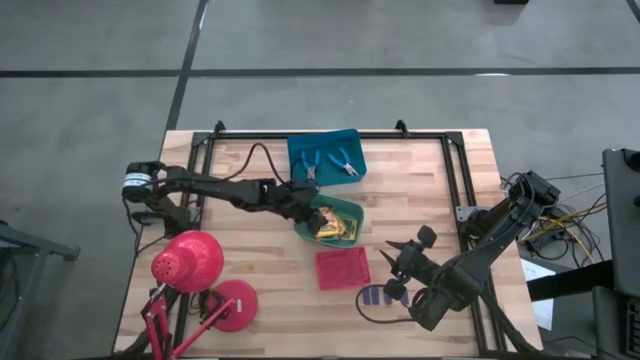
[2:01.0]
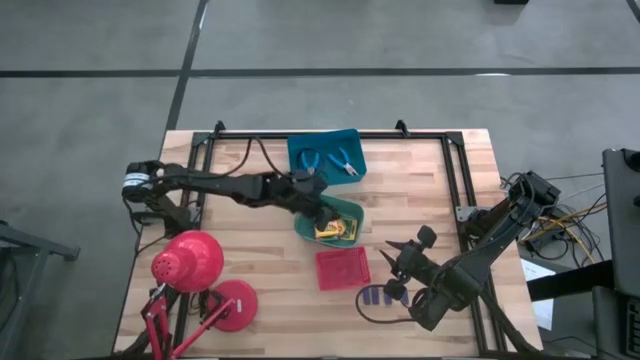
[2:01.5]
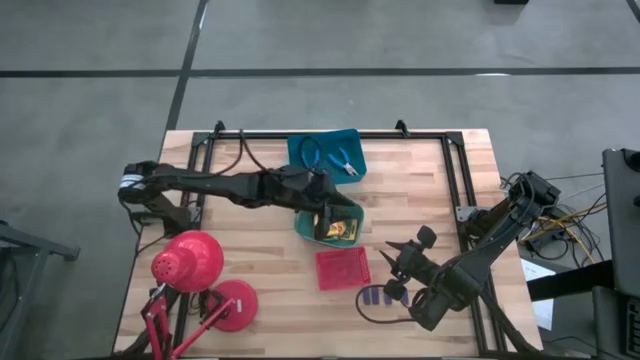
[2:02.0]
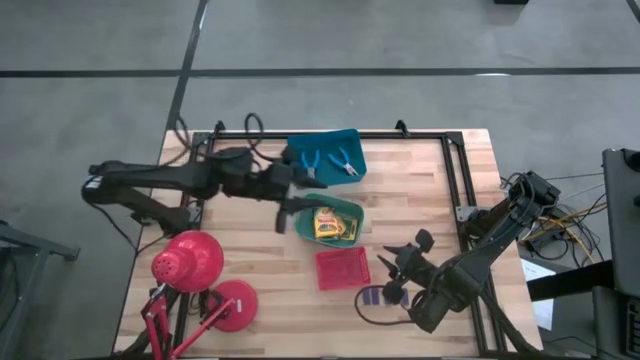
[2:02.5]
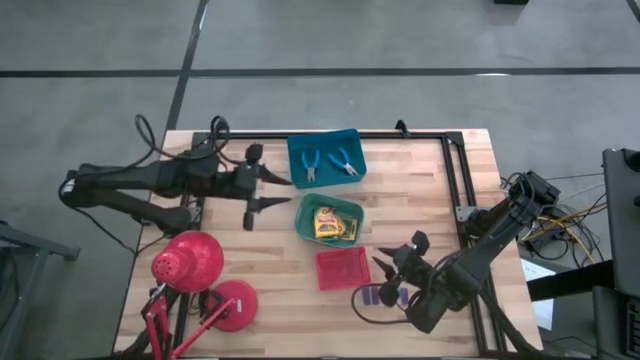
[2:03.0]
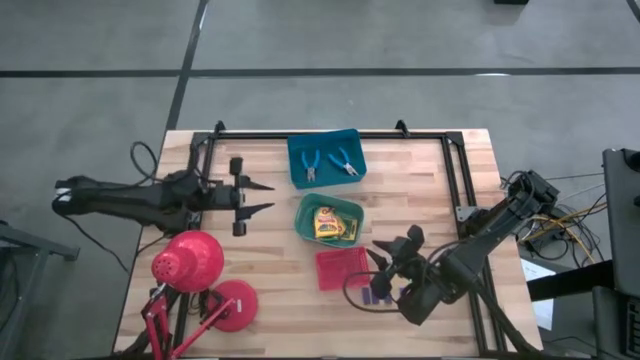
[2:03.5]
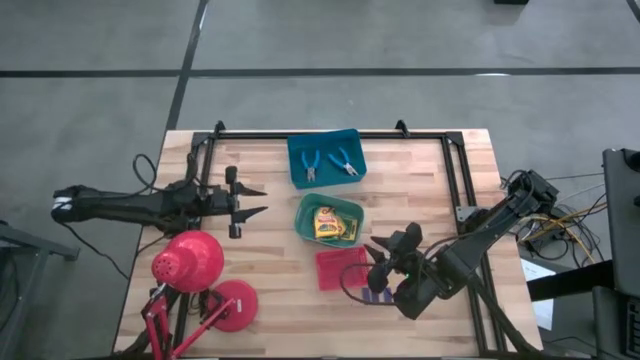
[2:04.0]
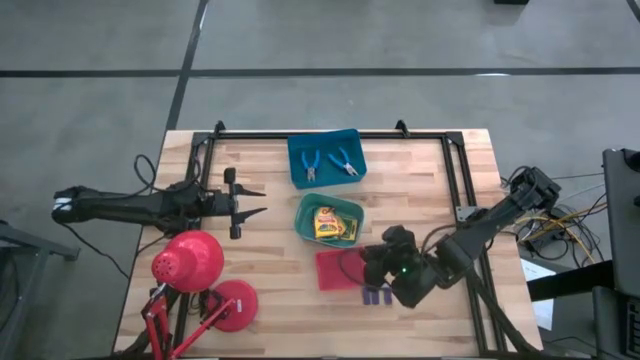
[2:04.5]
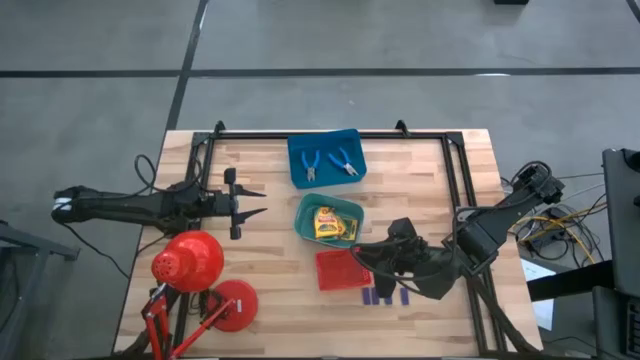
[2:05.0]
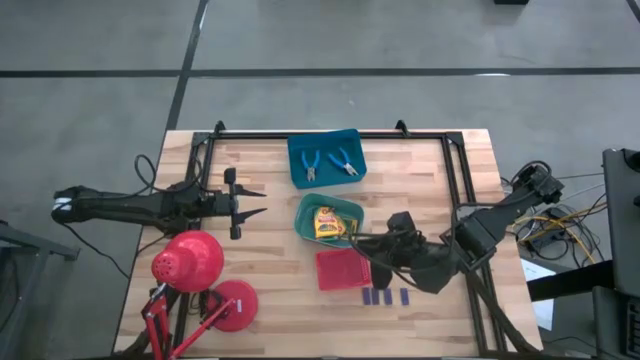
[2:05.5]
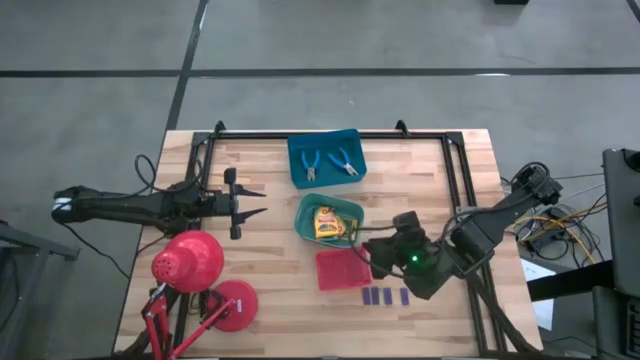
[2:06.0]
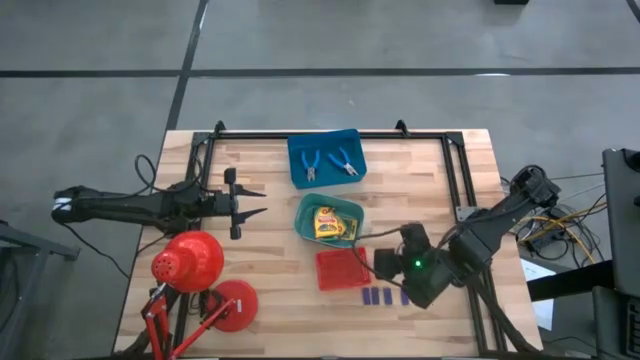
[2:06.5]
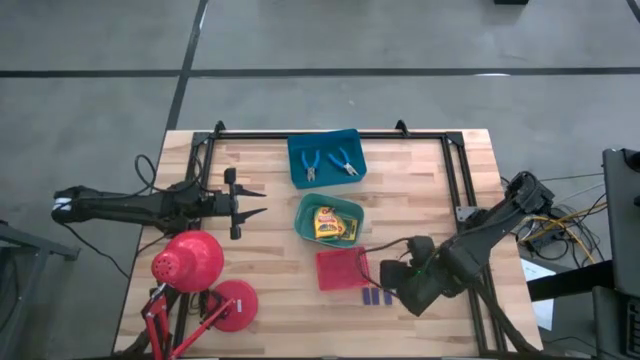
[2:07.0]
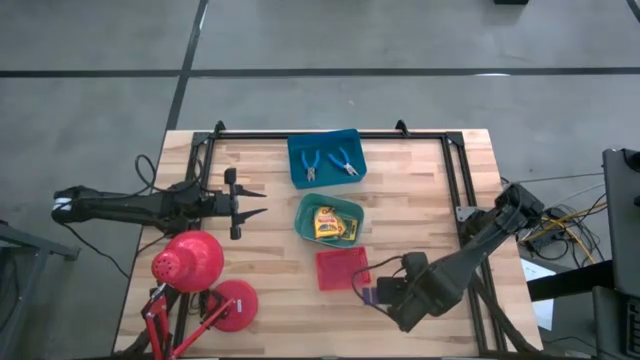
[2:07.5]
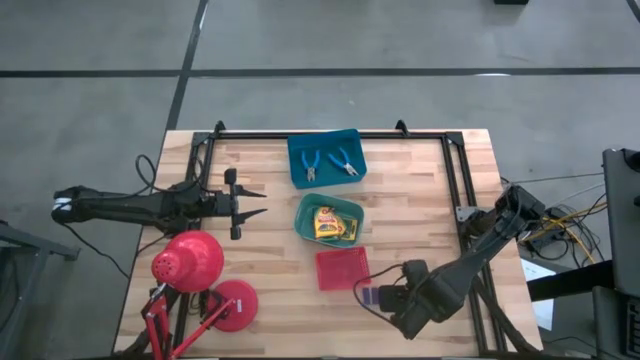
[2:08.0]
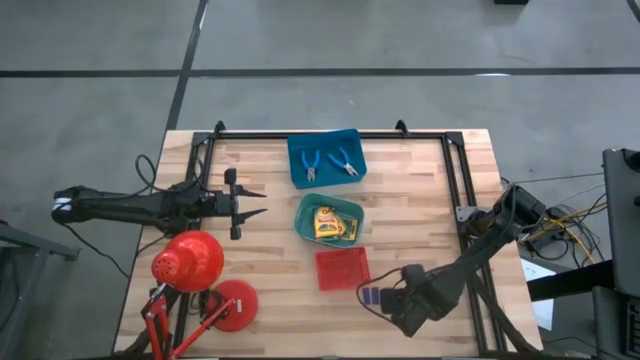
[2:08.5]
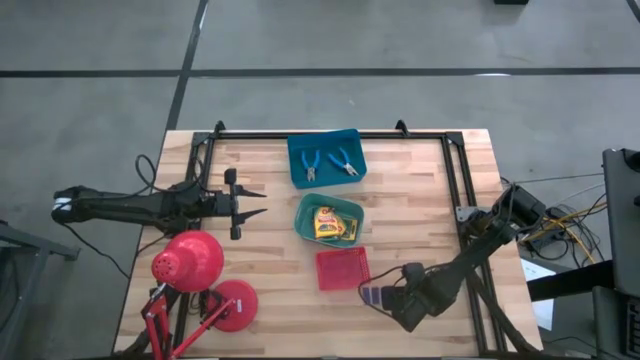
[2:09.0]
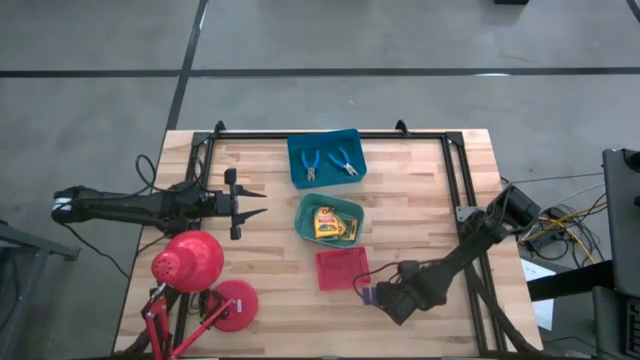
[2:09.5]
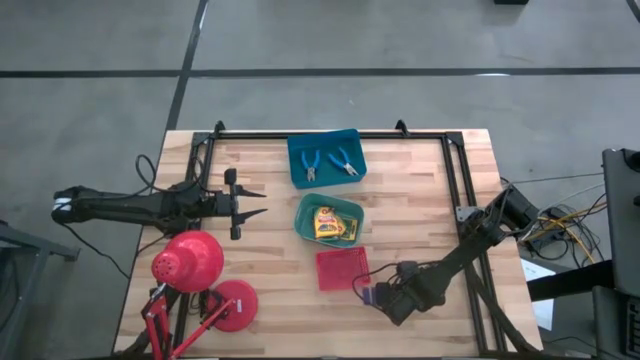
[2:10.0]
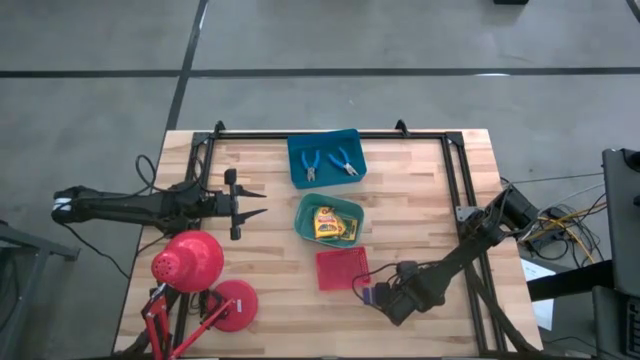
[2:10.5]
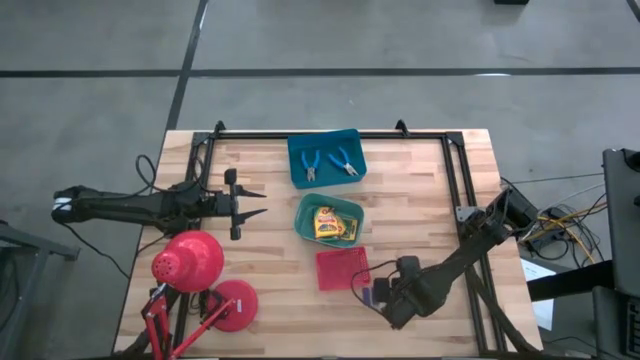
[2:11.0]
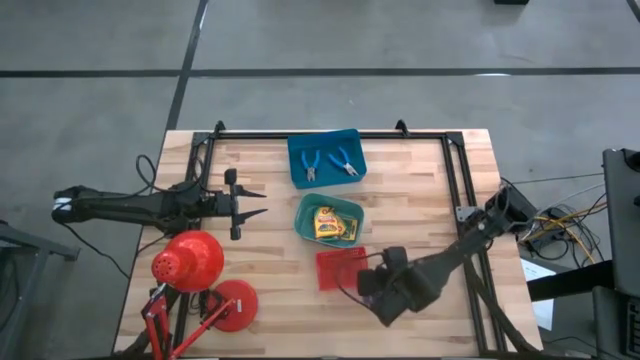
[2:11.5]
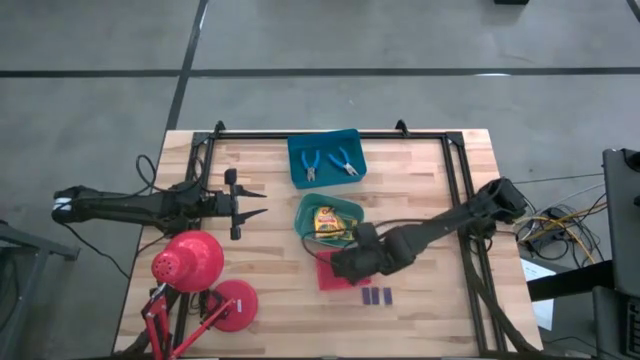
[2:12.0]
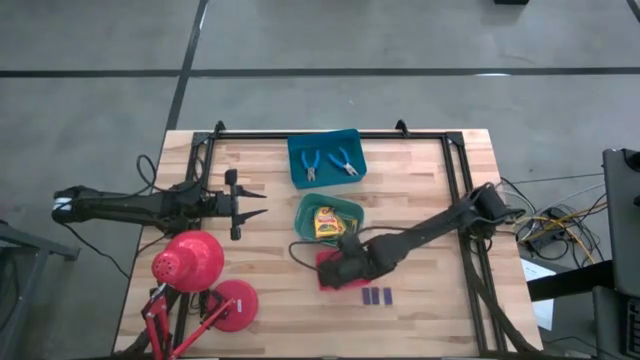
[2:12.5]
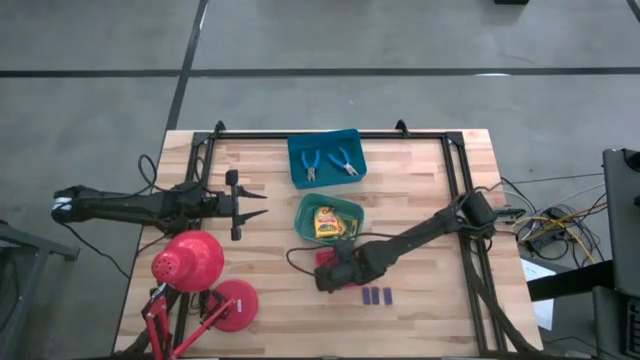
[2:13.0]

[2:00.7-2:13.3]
Task: Pick & Place School Supplies
Put the violet eraser in the red bin

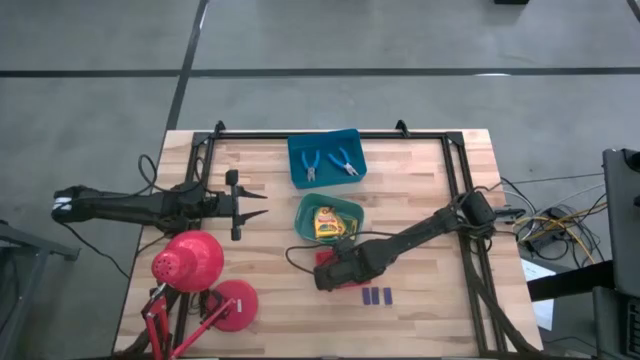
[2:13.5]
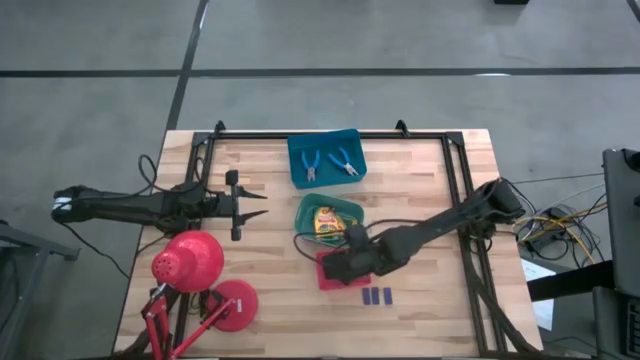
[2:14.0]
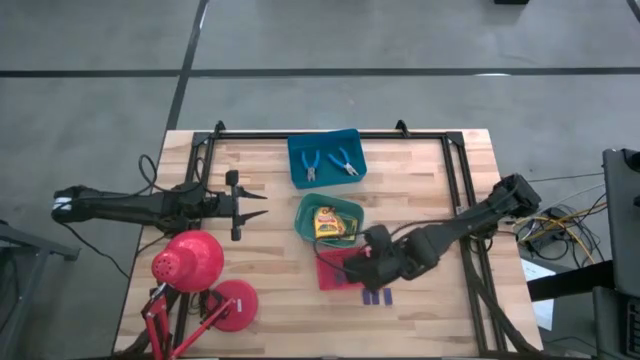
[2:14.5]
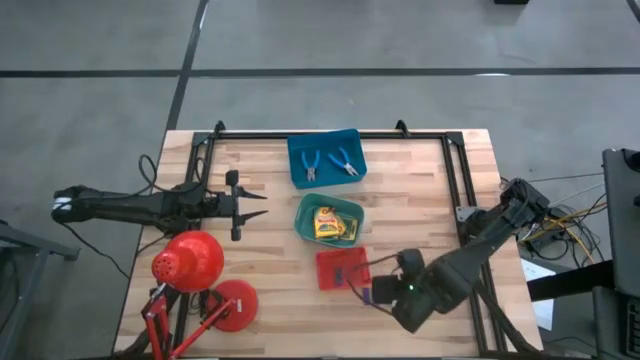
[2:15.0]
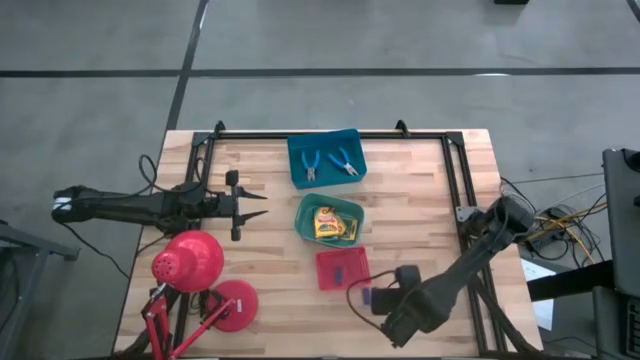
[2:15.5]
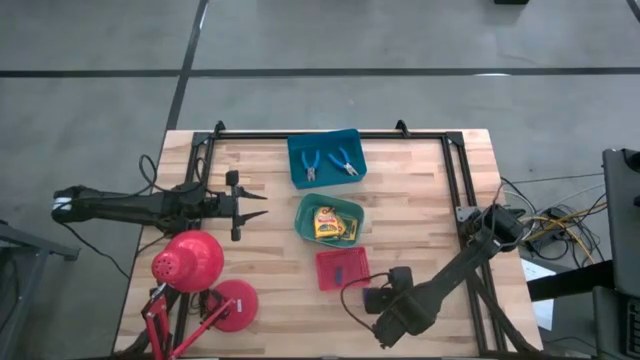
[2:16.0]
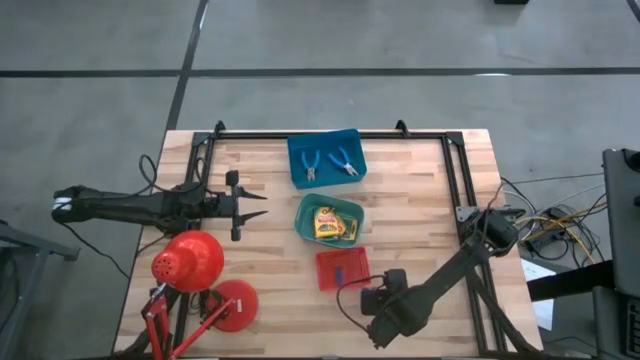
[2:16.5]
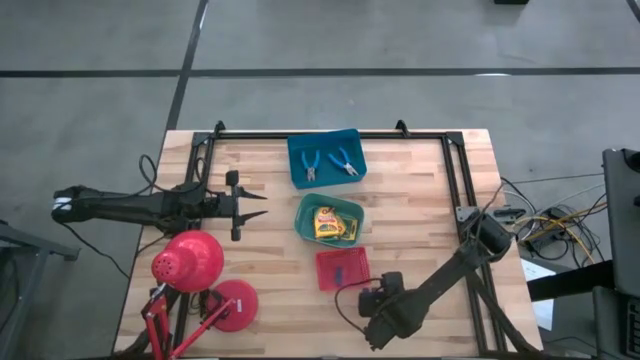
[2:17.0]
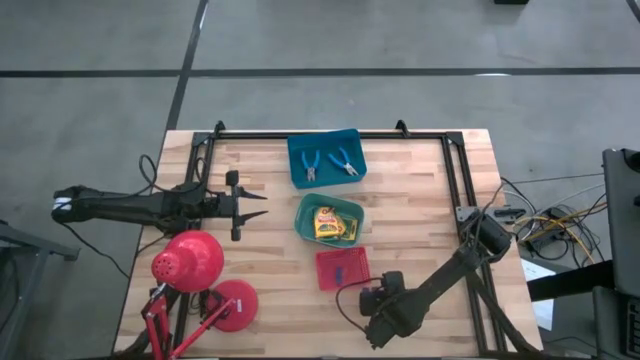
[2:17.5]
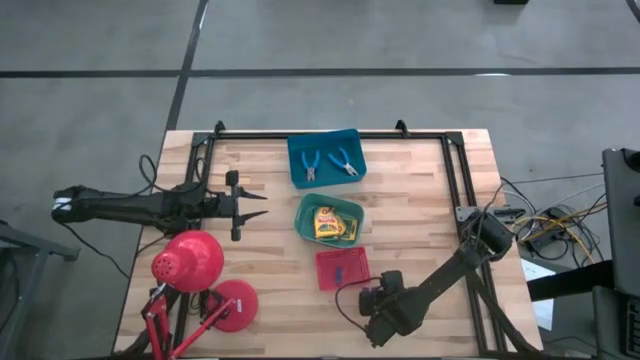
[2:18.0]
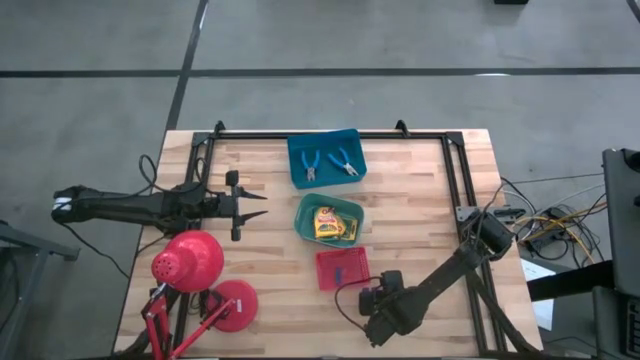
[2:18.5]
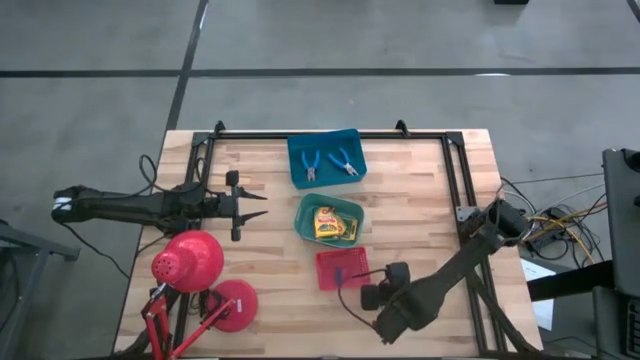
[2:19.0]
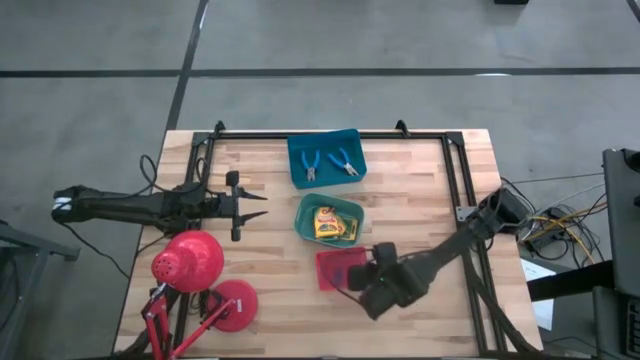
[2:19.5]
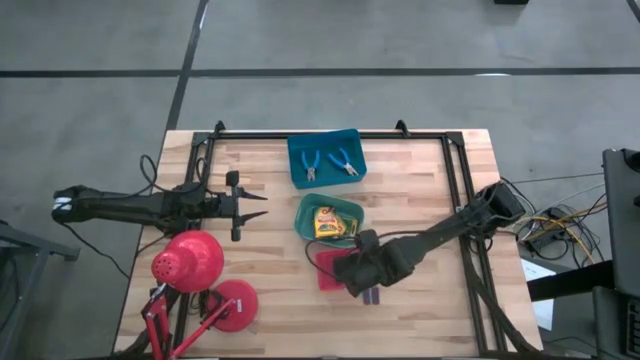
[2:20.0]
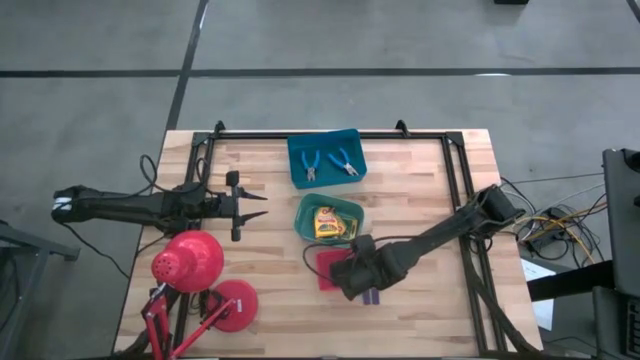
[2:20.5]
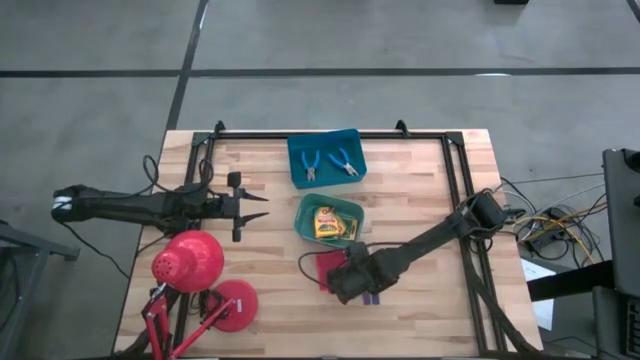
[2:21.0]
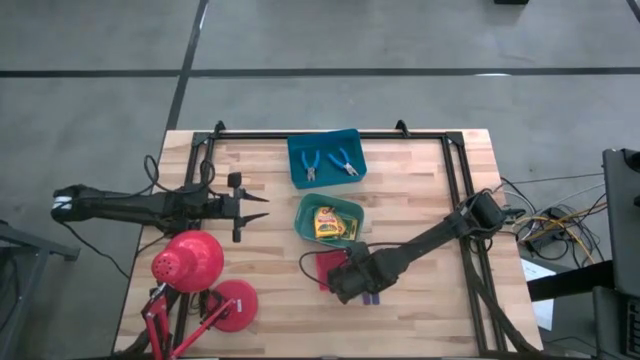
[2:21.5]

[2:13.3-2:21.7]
Put the violet eraser in the red bin
